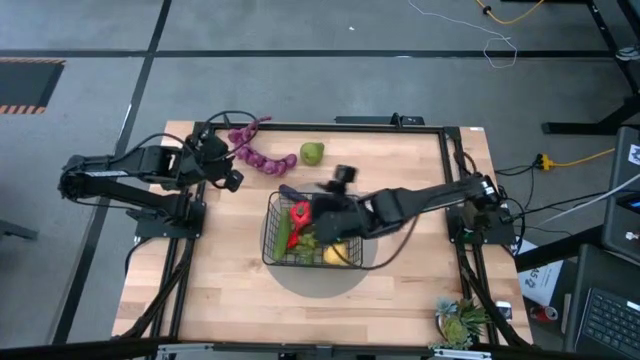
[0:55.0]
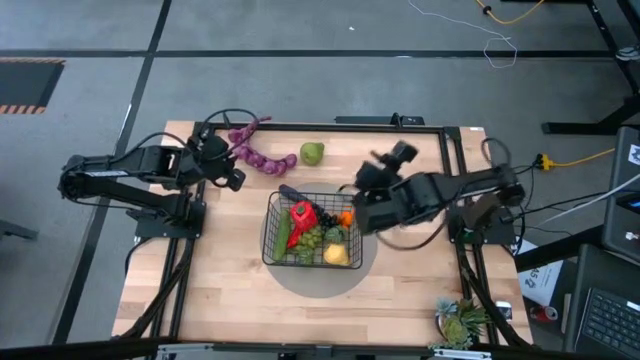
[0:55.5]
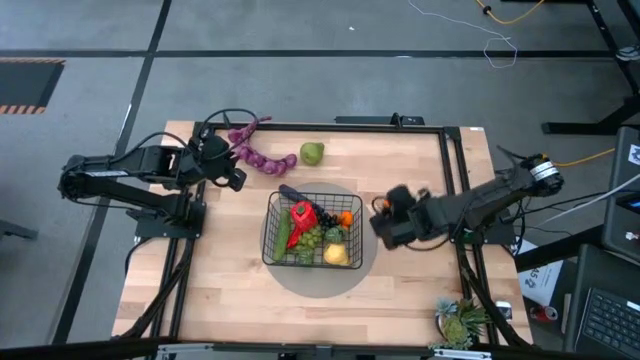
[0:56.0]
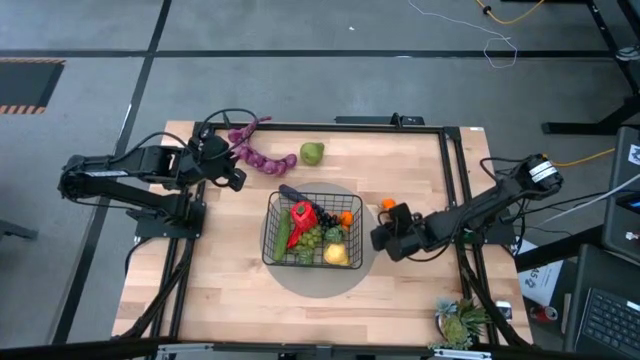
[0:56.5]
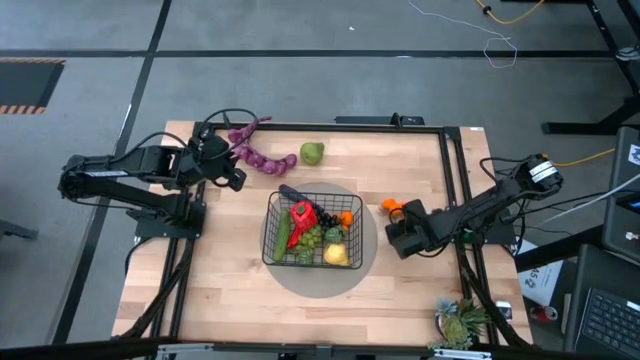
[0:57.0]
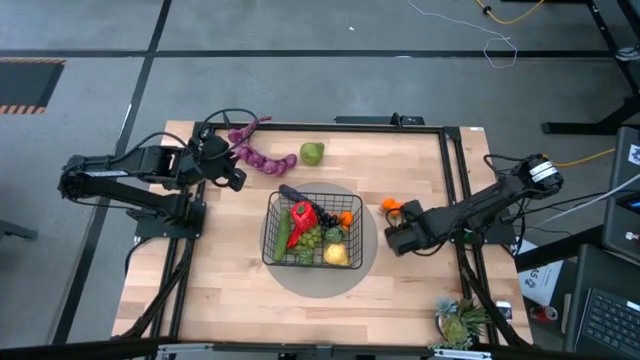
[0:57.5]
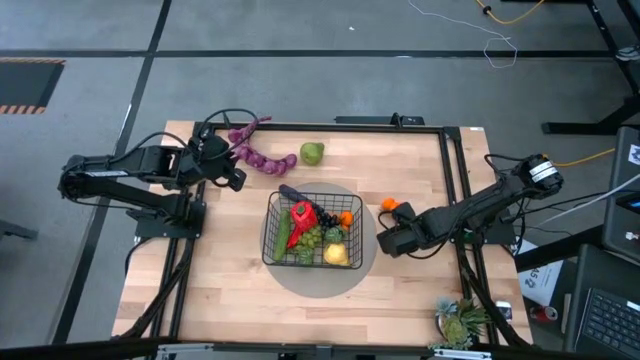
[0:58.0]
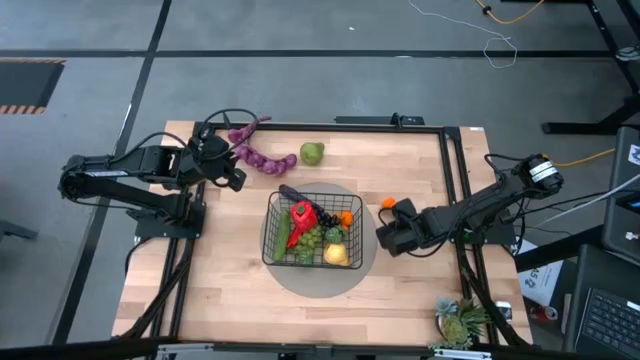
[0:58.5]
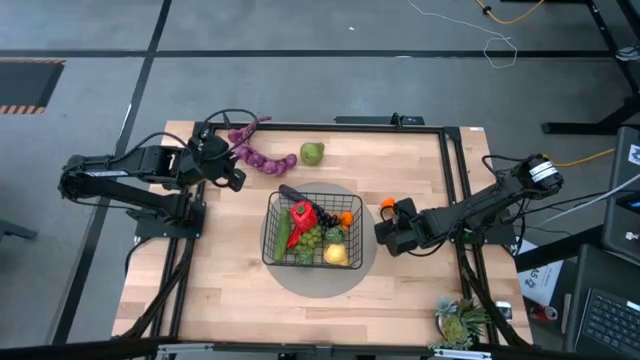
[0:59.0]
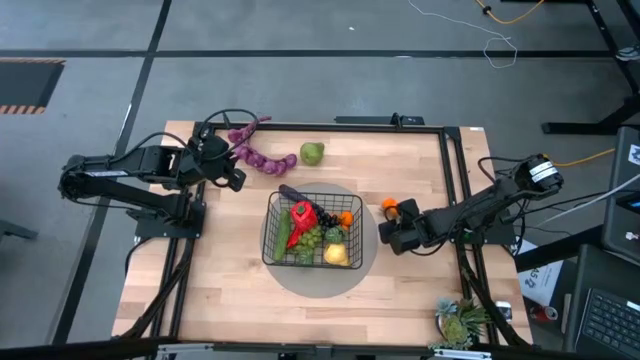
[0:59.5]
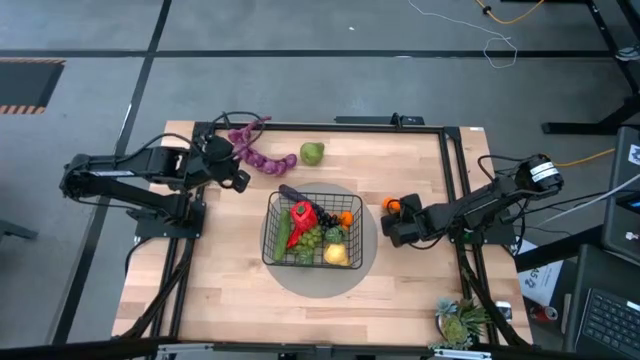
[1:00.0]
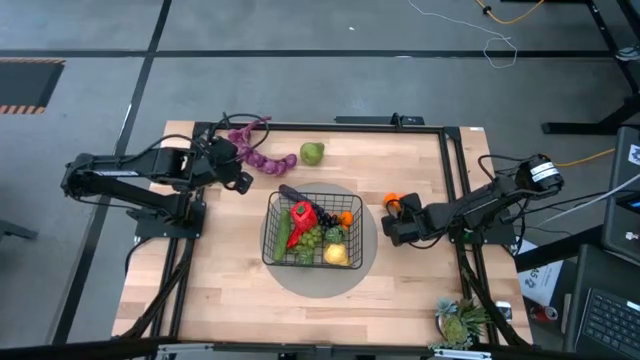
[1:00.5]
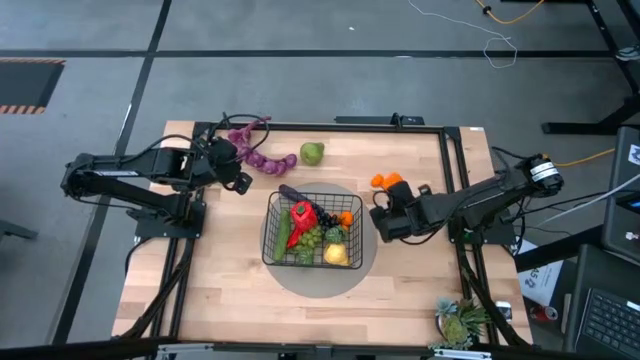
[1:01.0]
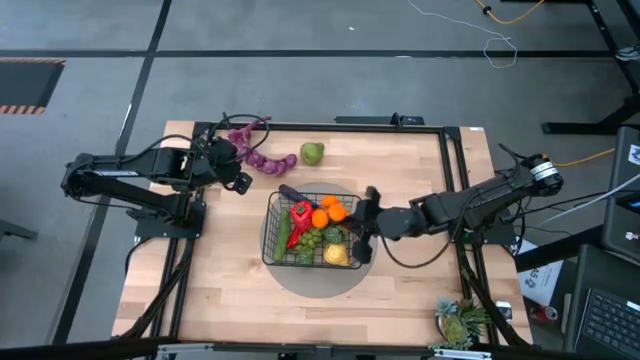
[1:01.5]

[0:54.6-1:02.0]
Task: Build produce basket
Put the tangerines into the black wire basket

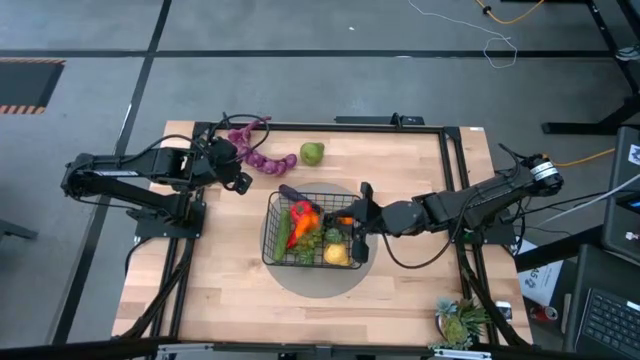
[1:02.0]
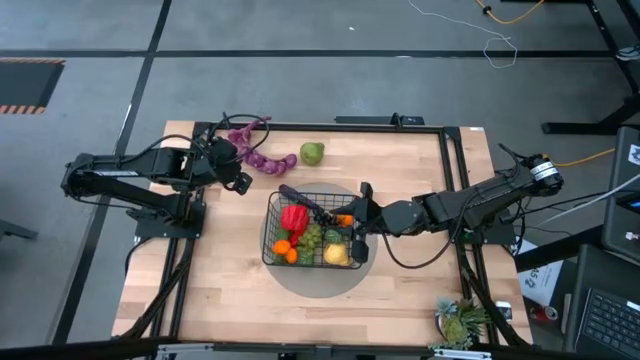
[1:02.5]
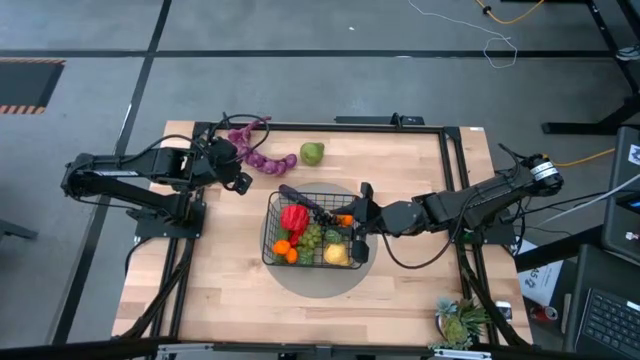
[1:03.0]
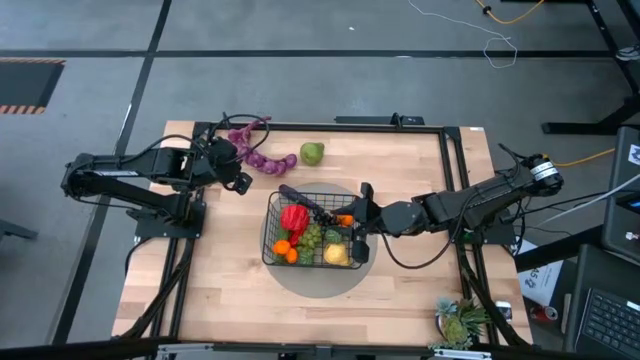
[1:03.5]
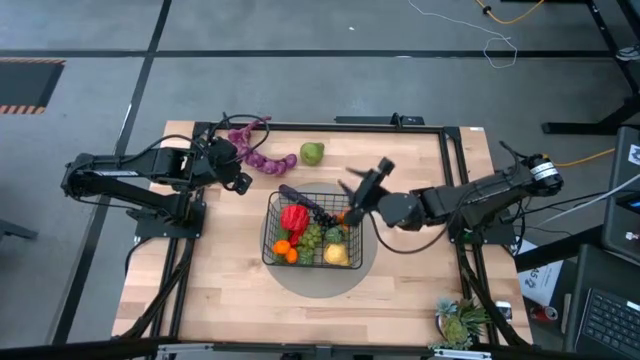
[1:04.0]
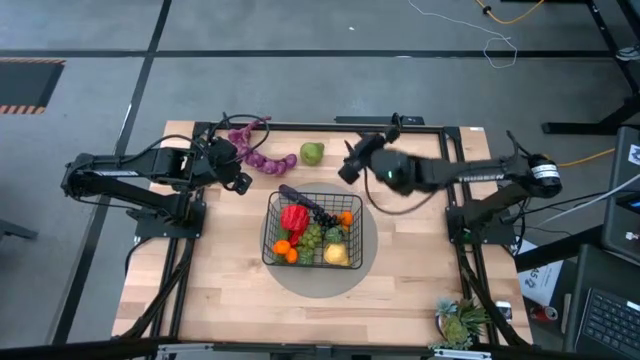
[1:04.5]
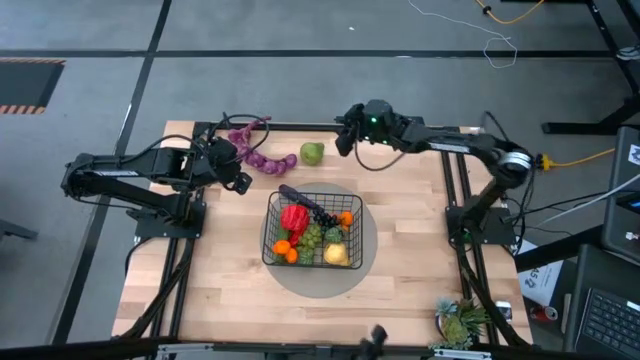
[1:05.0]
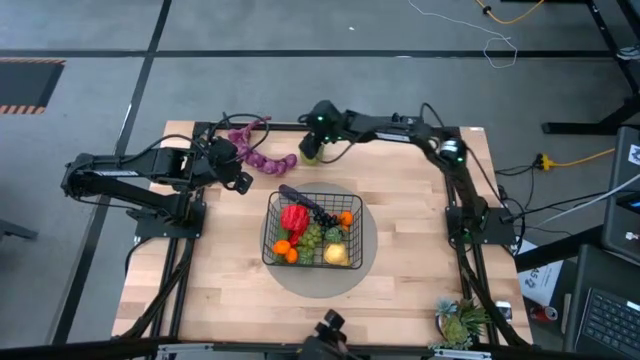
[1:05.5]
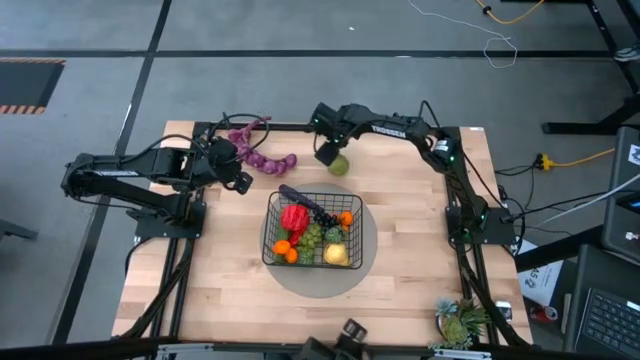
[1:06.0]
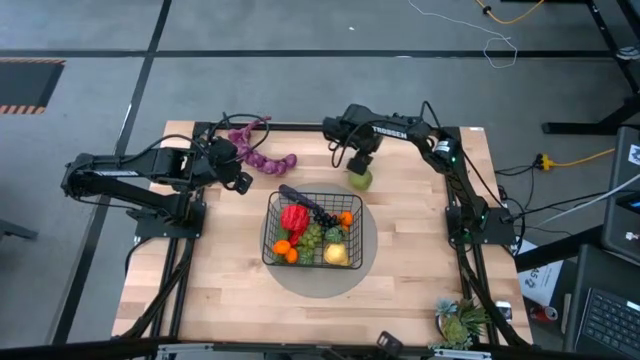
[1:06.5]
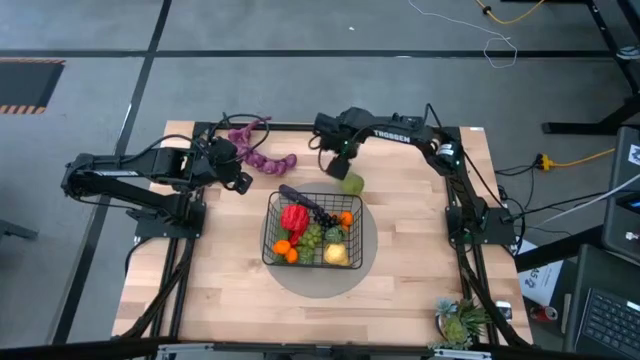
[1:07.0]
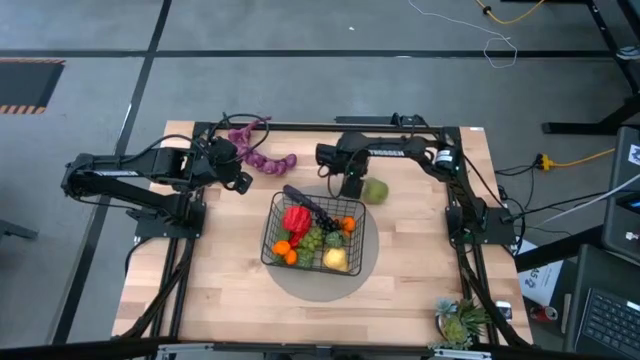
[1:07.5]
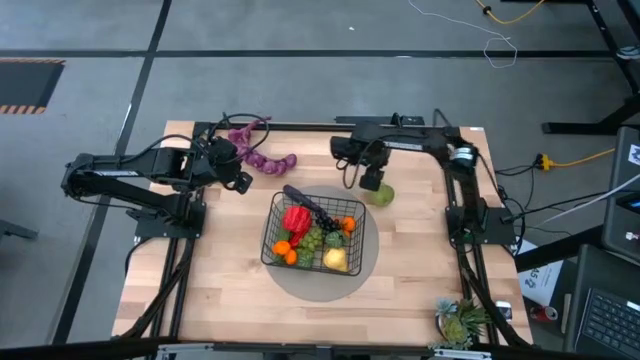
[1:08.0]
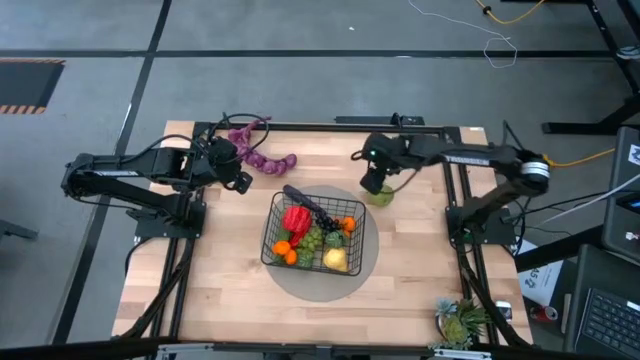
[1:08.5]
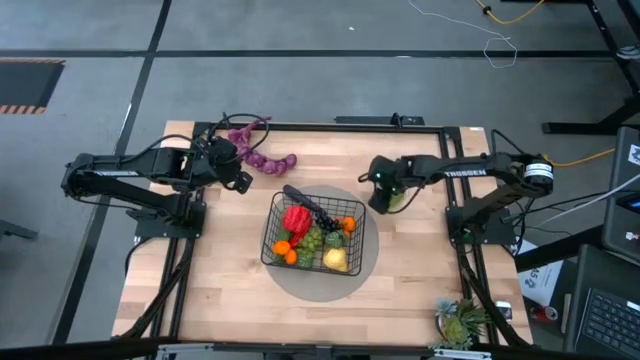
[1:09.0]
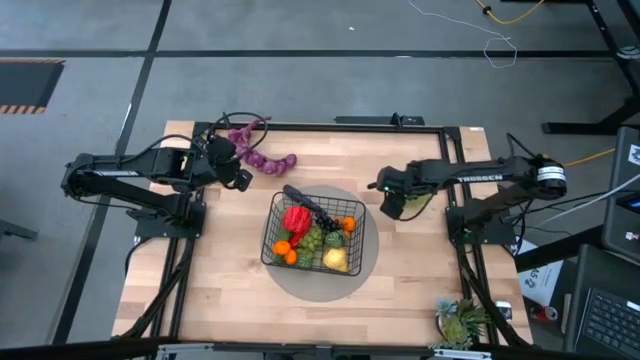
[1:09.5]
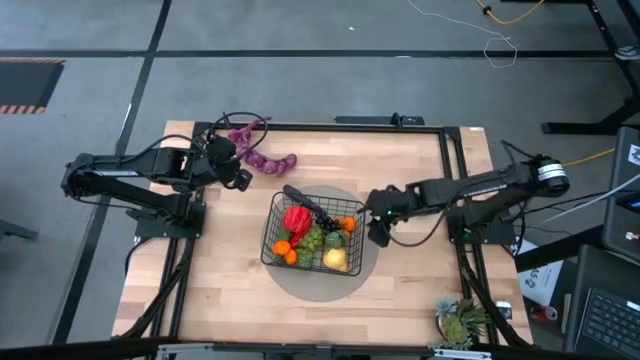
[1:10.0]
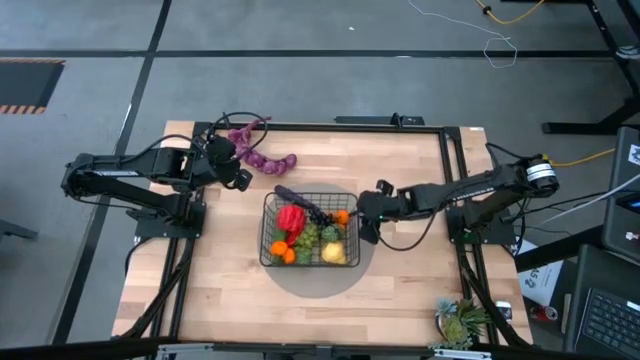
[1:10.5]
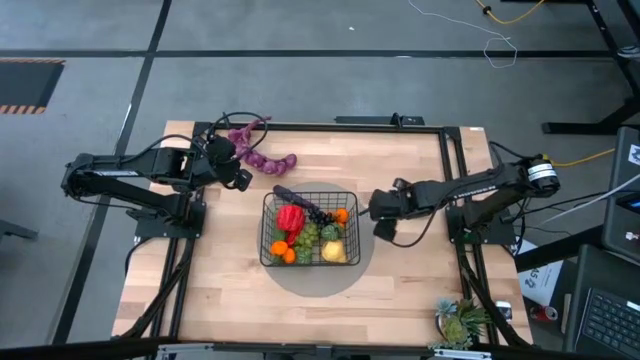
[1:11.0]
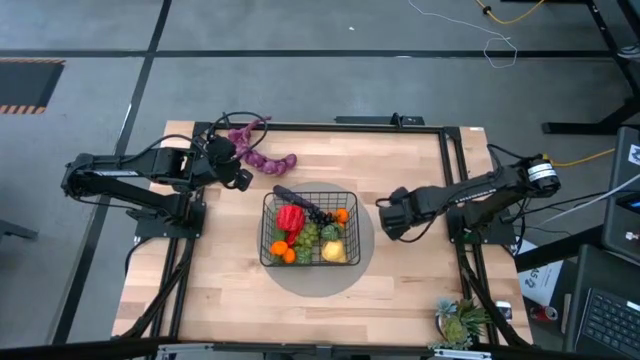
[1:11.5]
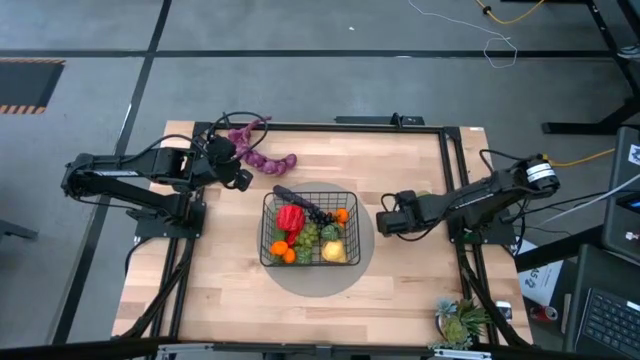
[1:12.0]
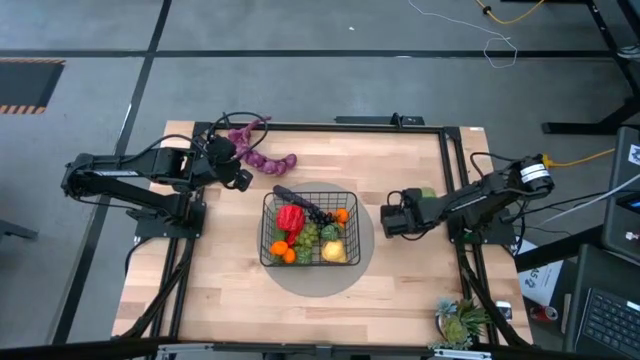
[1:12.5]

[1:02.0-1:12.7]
Put the green pear into the black wire basket

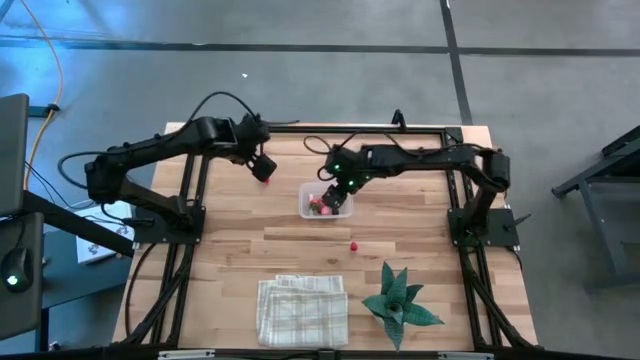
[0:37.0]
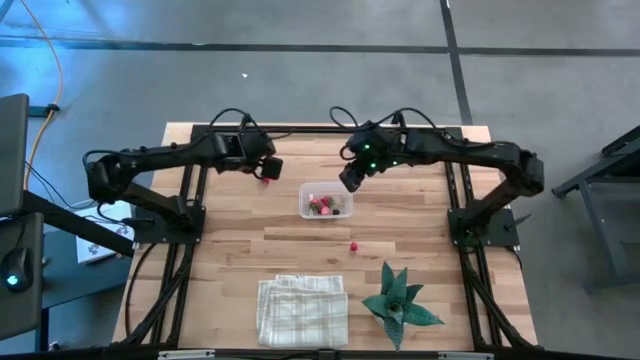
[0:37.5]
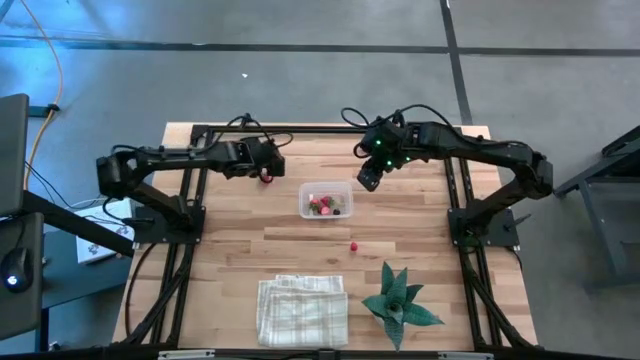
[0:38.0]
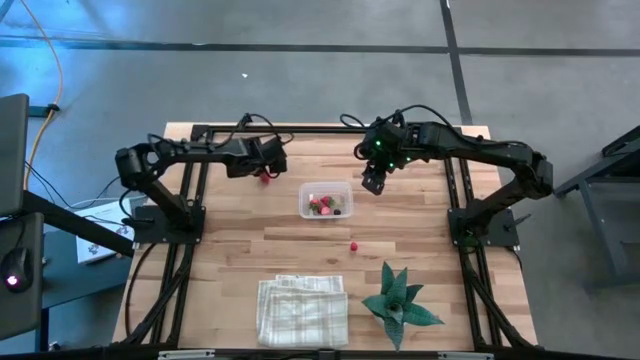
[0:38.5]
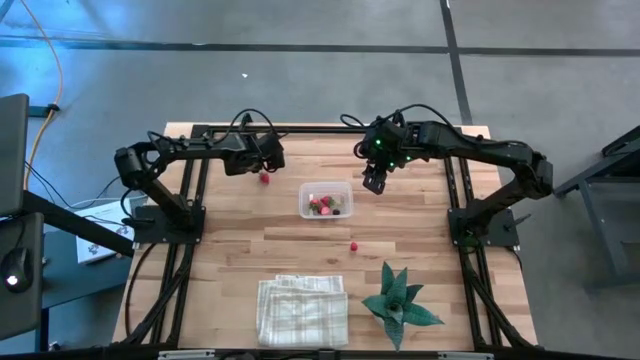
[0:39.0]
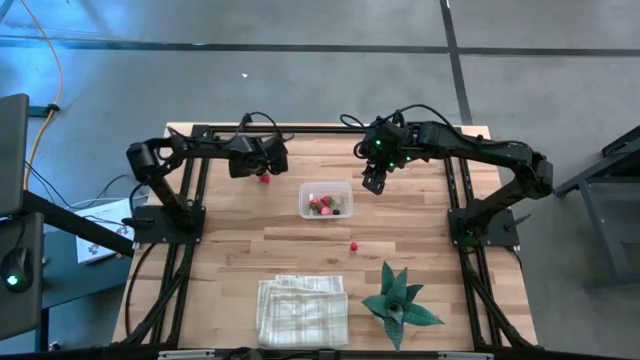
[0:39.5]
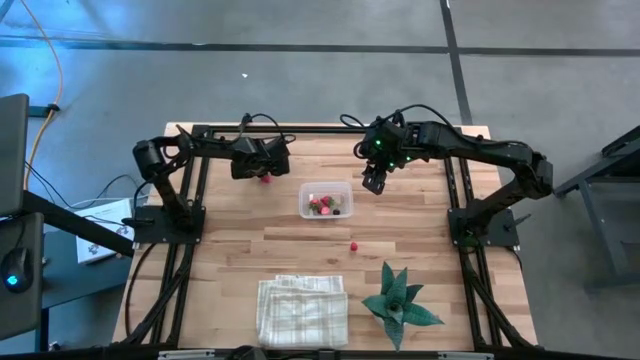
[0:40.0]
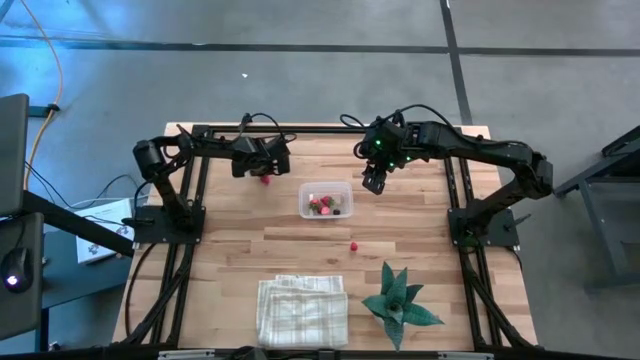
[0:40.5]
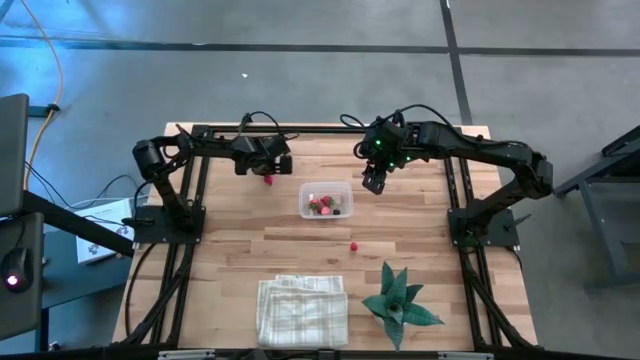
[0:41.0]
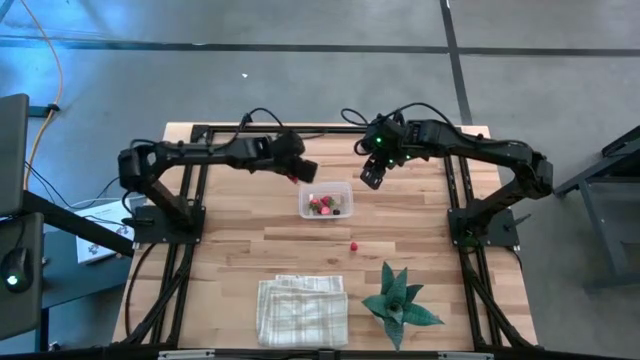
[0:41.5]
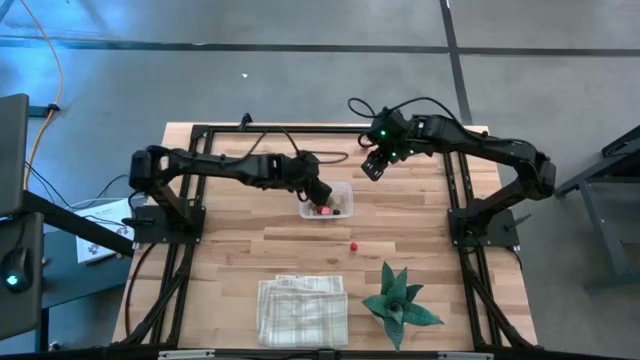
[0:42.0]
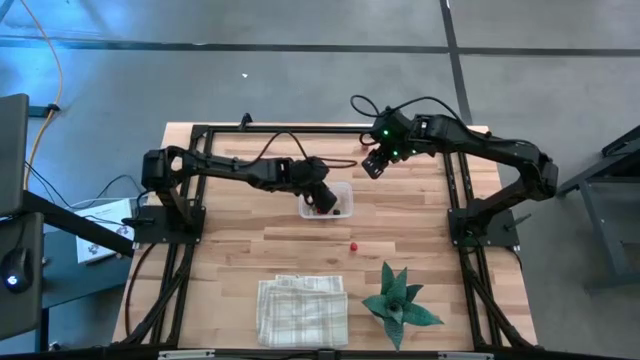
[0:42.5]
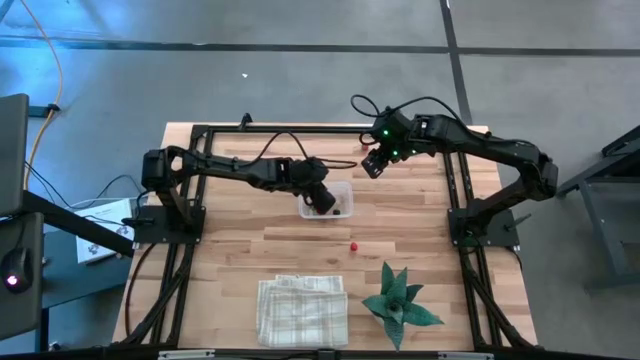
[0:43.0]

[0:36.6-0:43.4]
Task: Pick and placing Produce into tupperware
Put the red strawberry into the transparent bin
